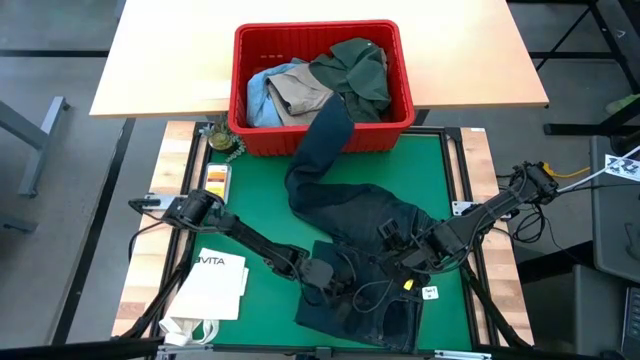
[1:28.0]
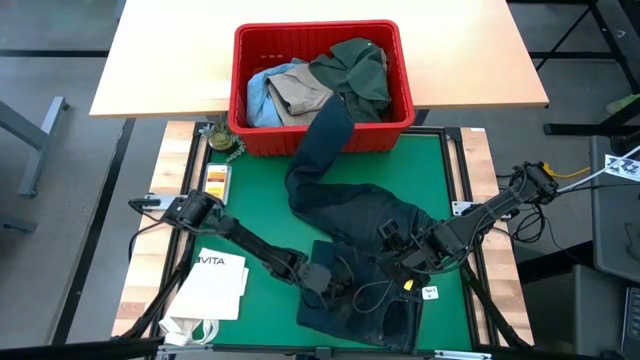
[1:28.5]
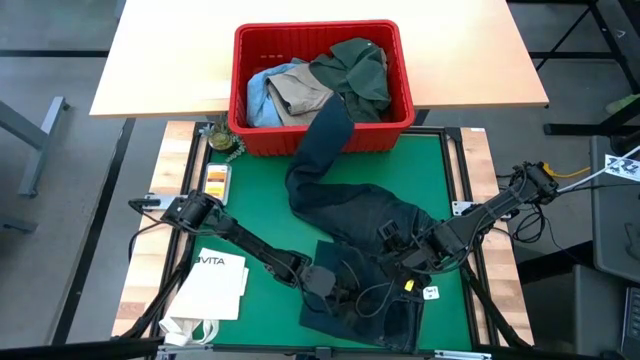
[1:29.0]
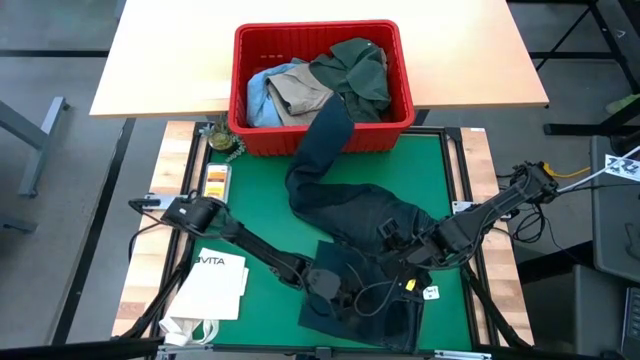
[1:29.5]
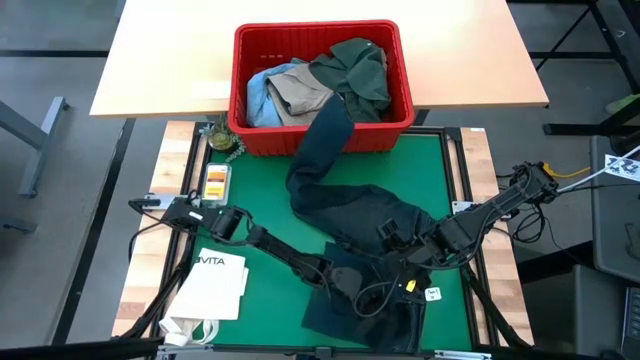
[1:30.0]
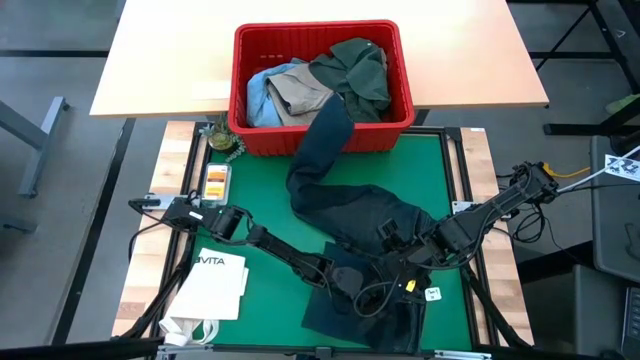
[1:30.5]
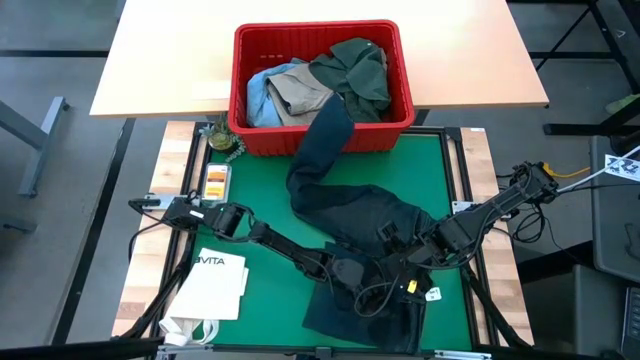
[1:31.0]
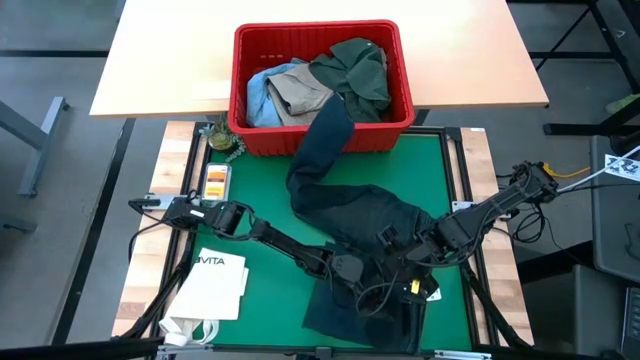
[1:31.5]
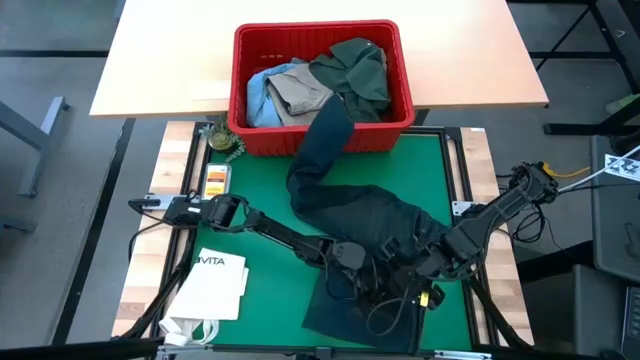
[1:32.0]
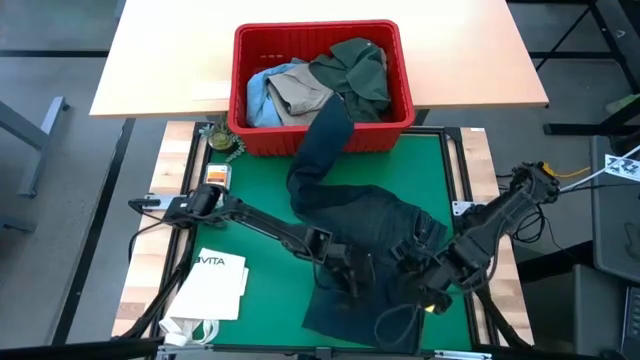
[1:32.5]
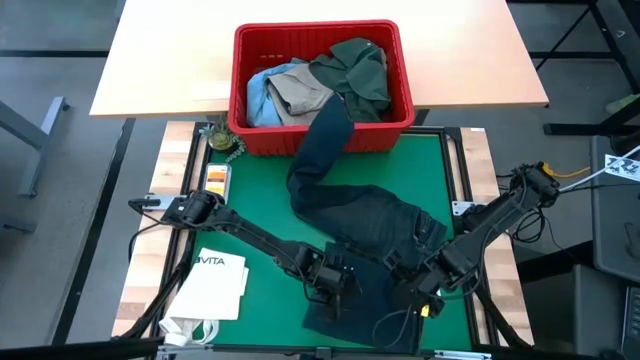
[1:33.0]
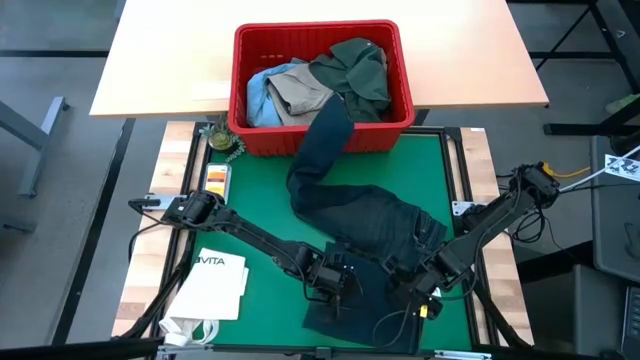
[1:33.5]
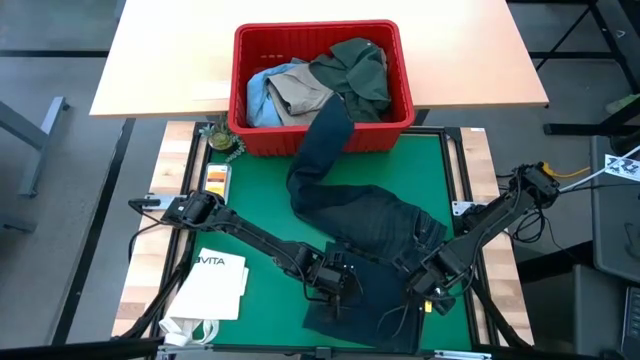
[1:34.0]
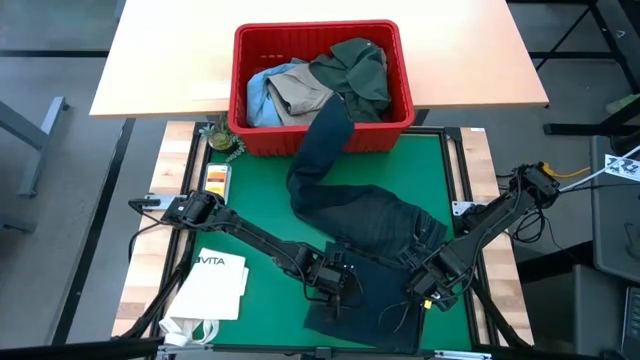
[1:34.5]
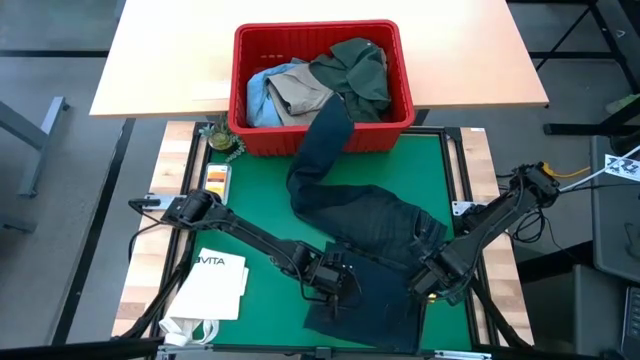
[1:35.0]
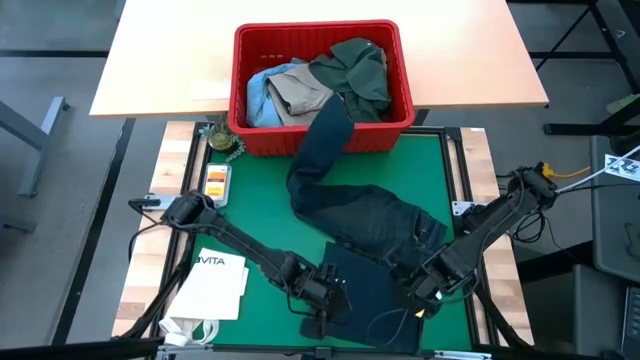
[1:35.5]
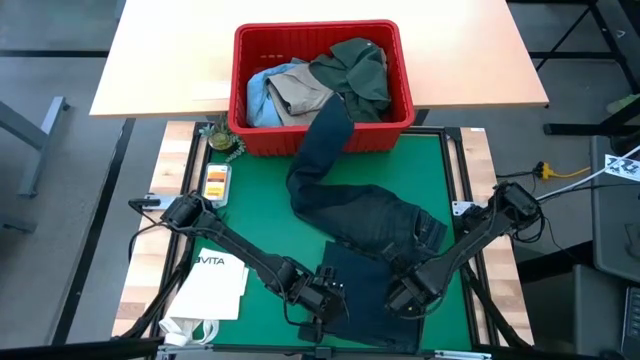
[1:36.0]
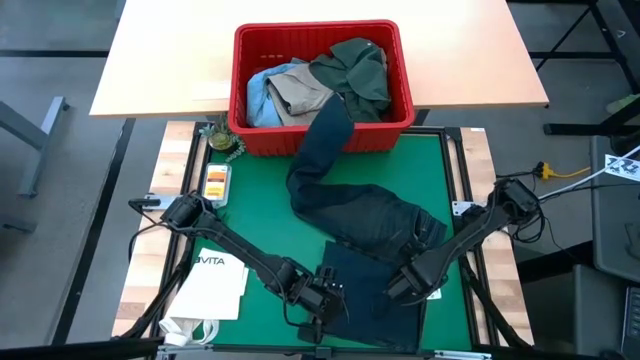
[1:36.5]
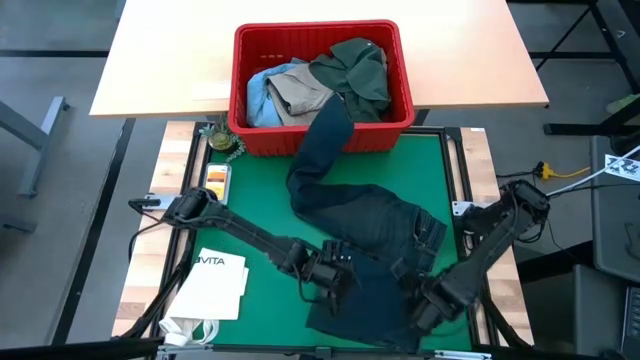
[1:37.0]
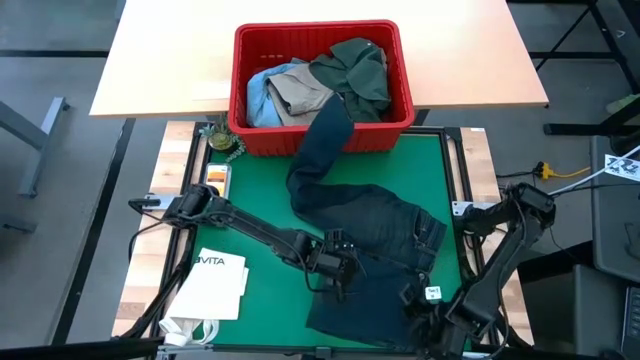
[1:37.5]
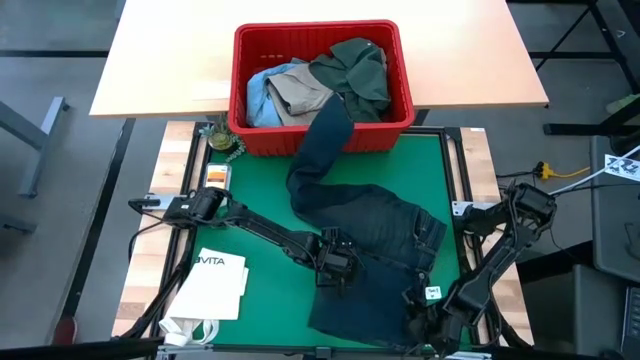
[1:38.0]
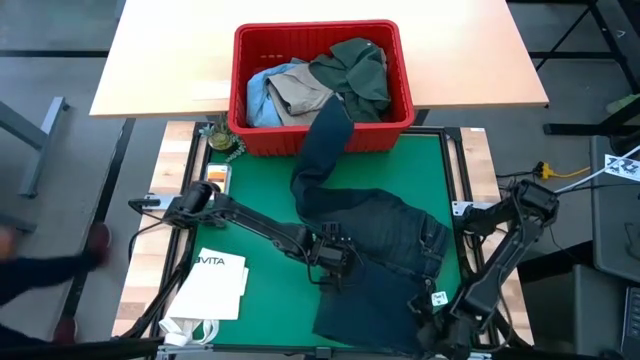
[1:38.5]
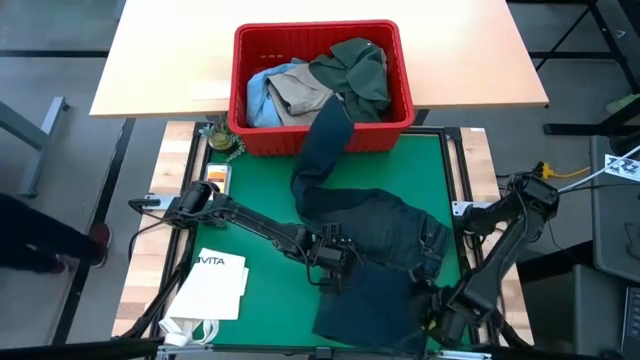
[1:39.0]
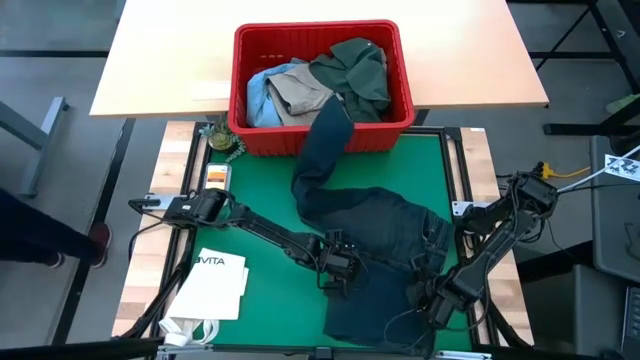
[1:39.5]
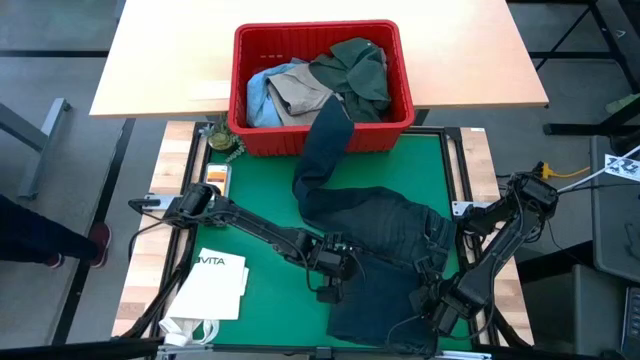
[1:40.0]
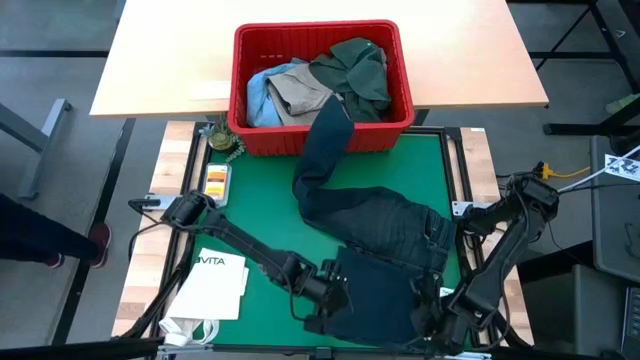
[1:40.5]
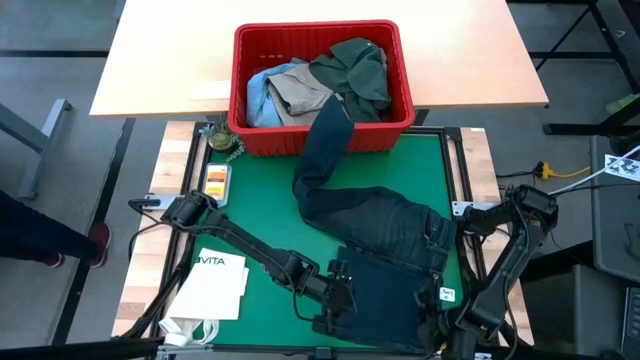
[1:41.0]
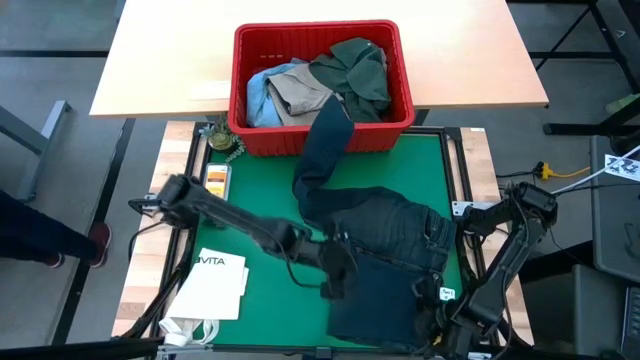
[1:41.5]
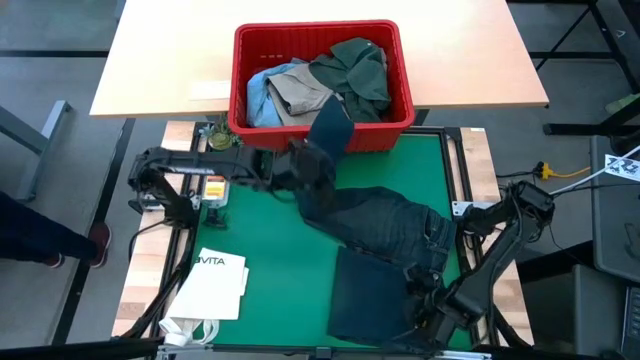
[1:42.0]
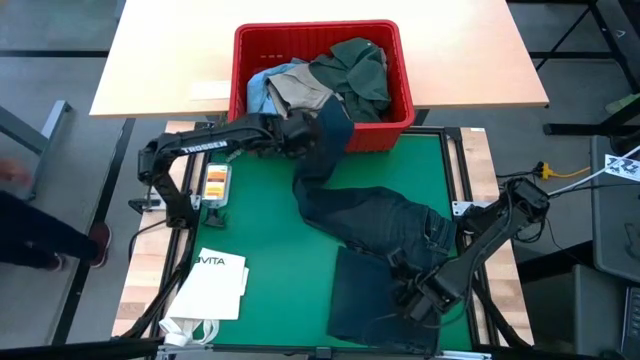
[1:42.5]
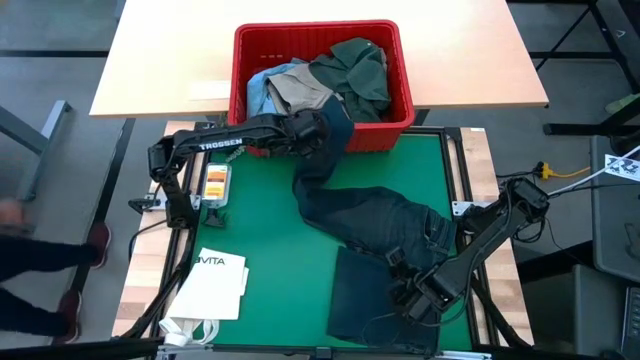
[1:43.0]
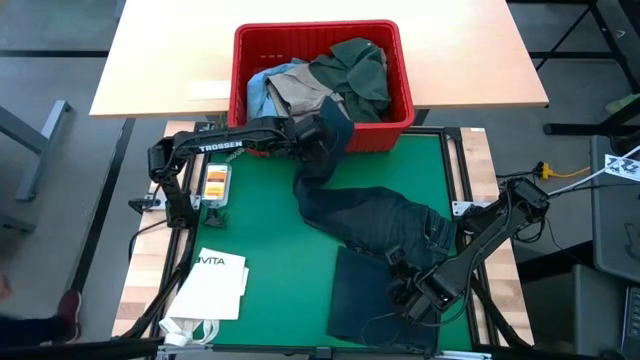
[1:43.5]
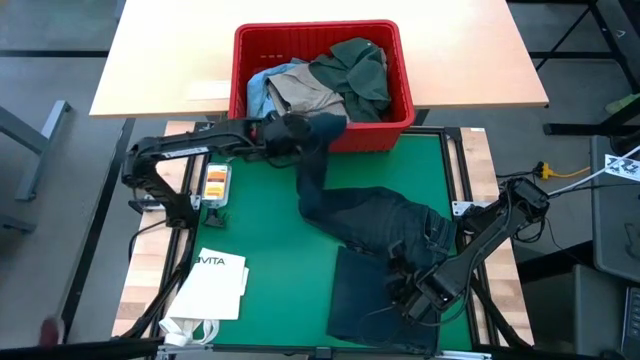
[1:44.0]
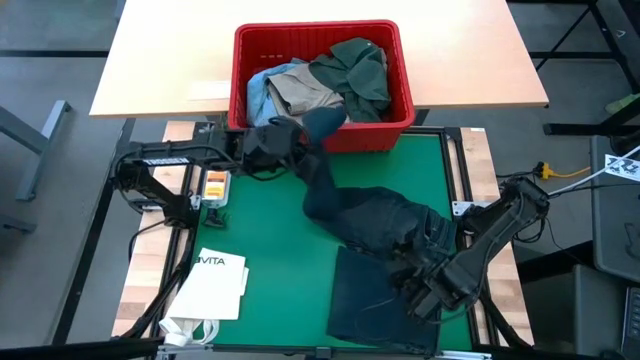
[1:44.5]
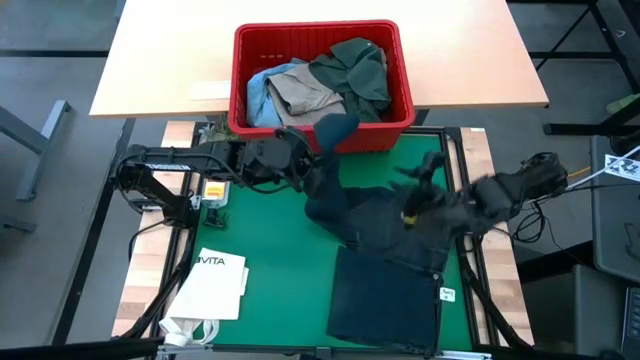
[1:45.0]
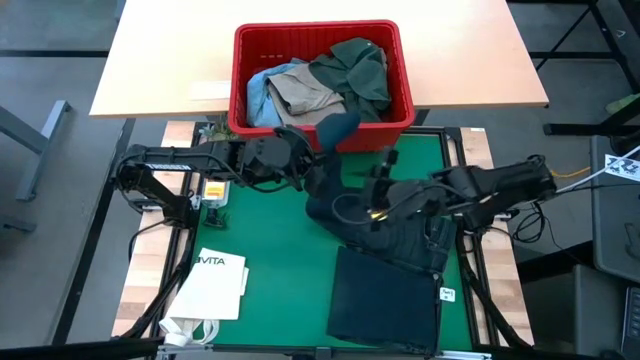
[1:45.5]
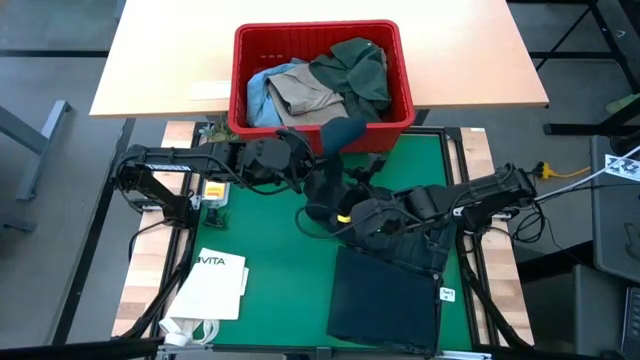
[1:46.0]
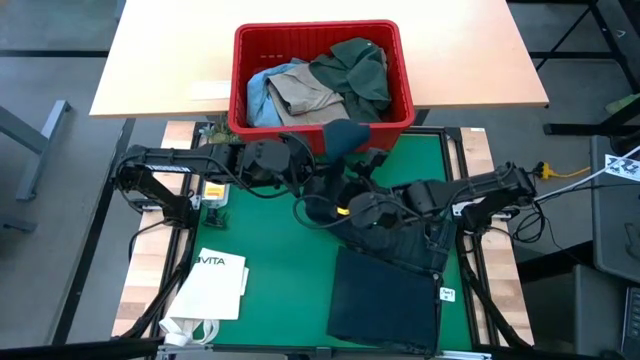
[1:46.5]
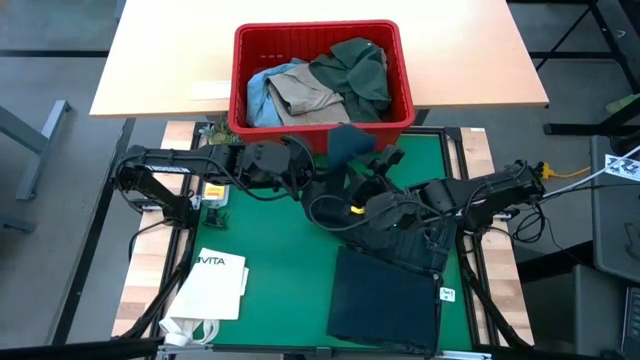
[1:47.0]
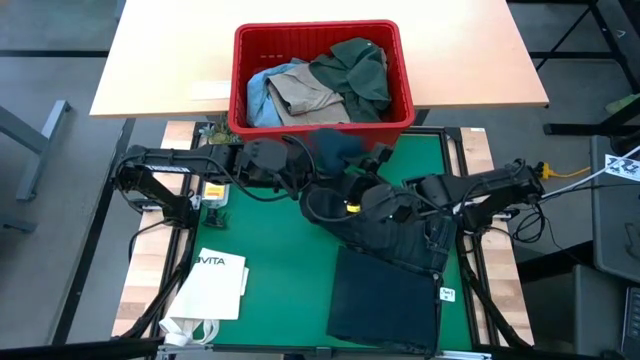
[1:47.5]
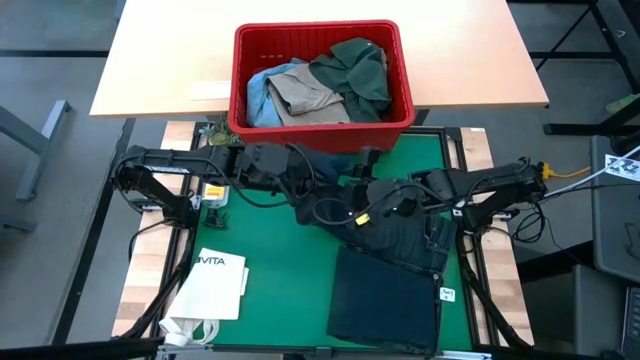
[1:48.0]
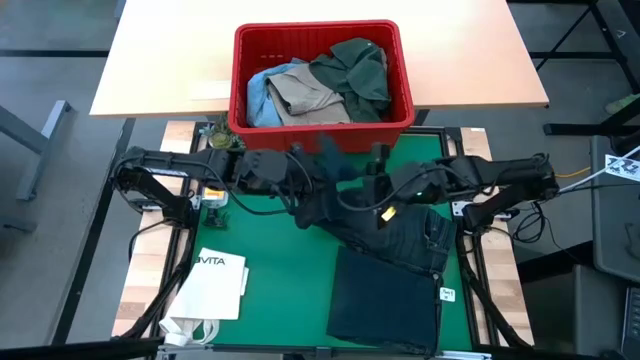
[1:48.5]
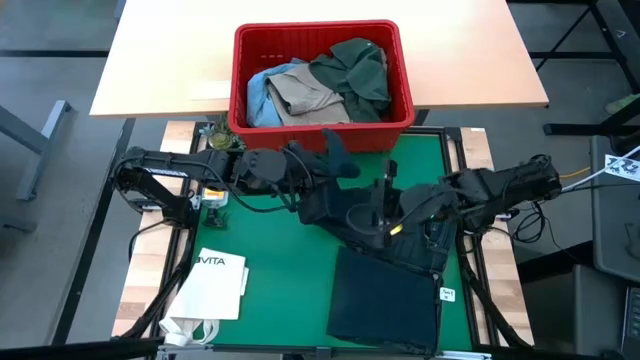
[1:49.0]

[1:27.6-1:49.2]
Task: Fold Laundry from Bin
Fold the dark blue pants
